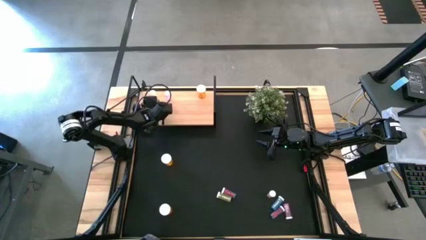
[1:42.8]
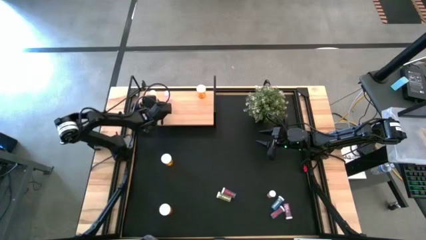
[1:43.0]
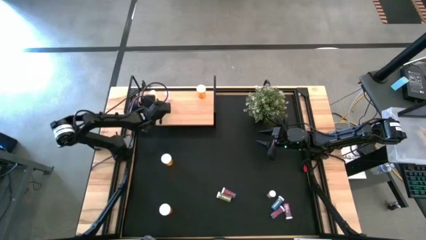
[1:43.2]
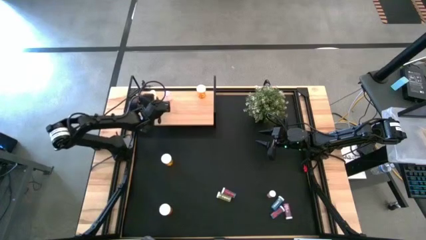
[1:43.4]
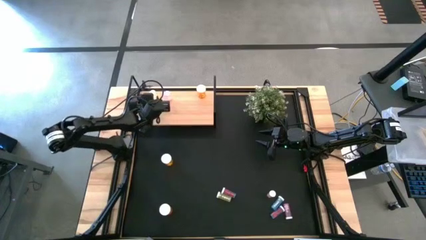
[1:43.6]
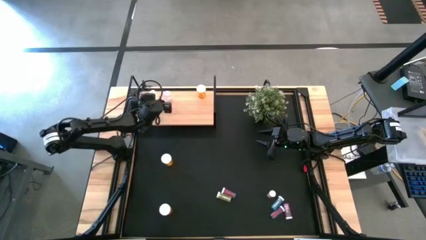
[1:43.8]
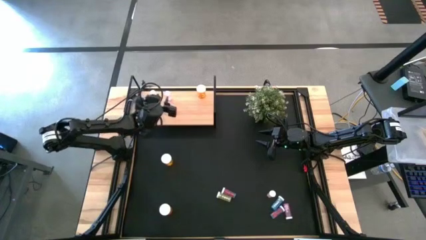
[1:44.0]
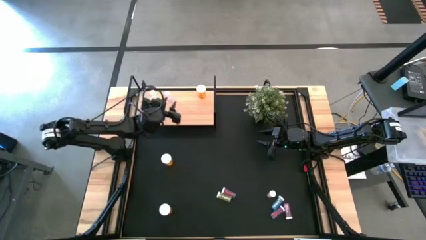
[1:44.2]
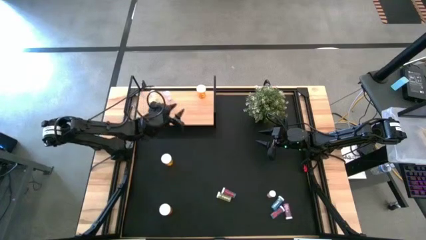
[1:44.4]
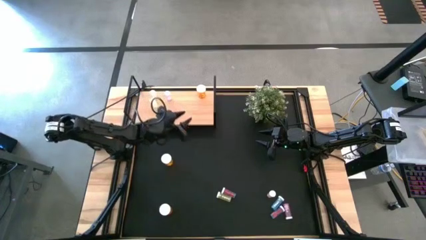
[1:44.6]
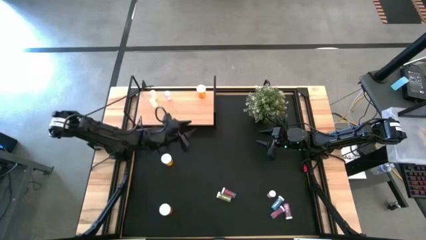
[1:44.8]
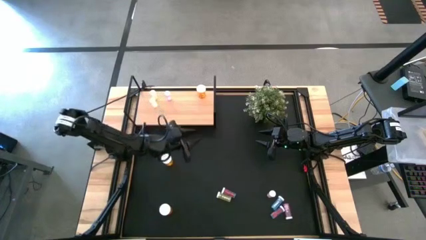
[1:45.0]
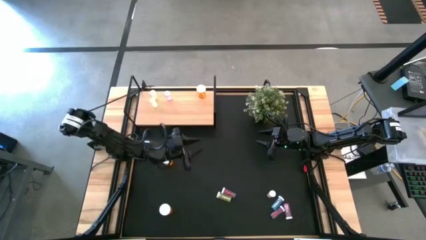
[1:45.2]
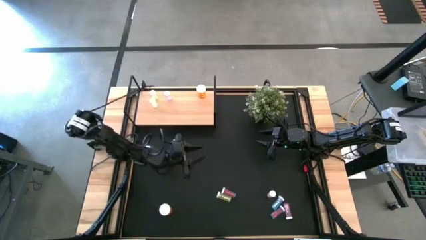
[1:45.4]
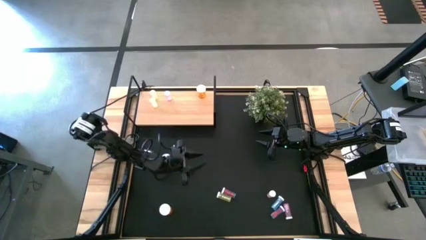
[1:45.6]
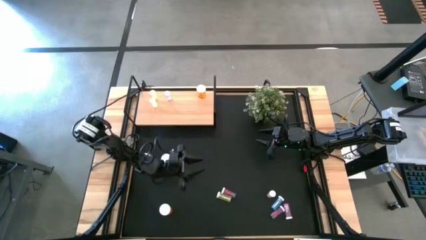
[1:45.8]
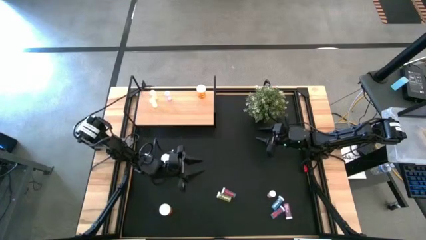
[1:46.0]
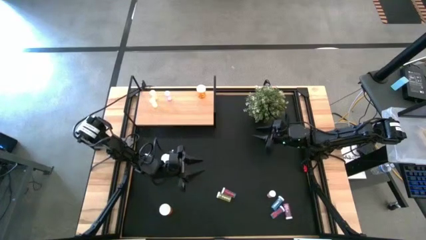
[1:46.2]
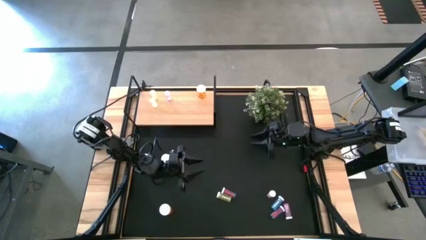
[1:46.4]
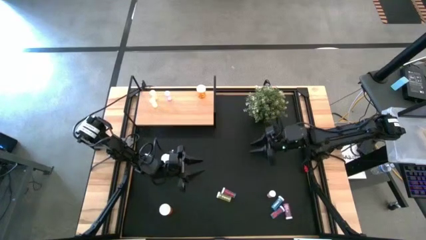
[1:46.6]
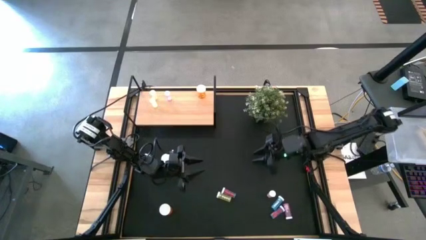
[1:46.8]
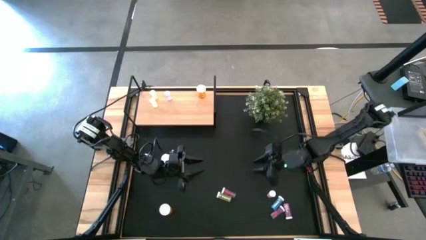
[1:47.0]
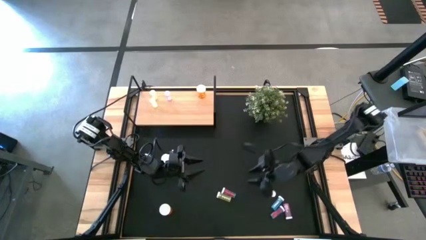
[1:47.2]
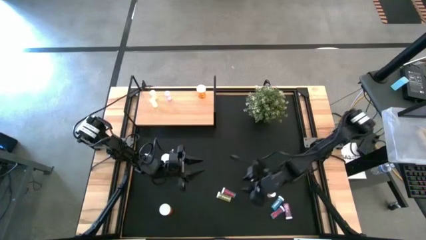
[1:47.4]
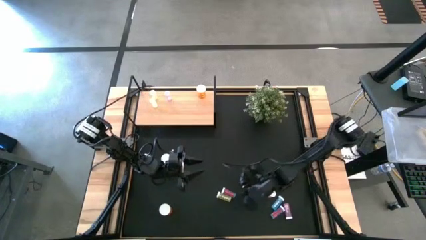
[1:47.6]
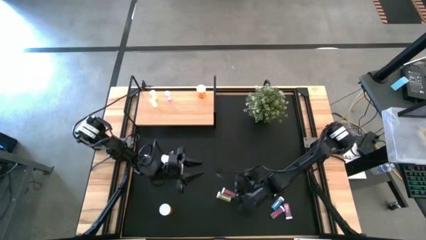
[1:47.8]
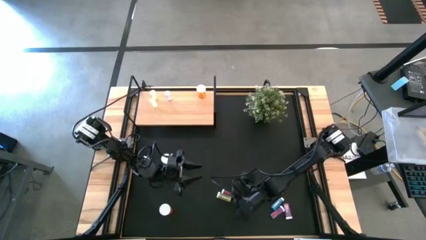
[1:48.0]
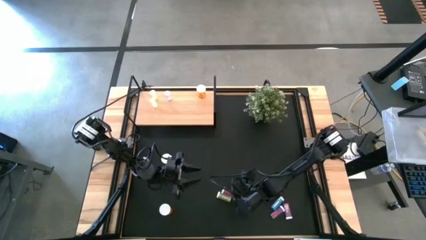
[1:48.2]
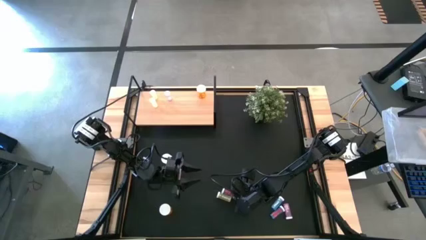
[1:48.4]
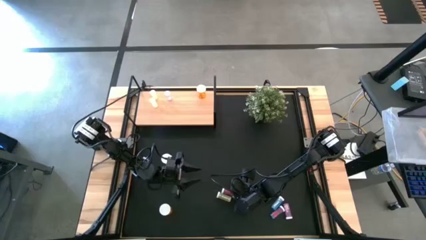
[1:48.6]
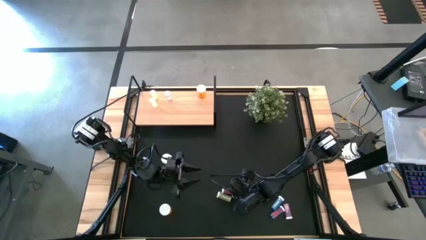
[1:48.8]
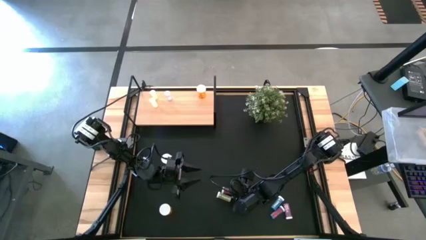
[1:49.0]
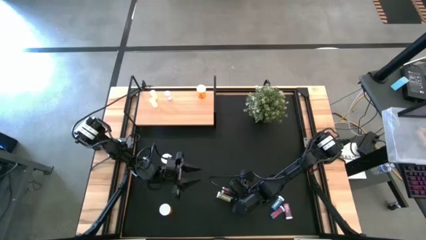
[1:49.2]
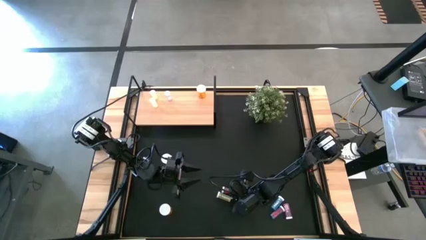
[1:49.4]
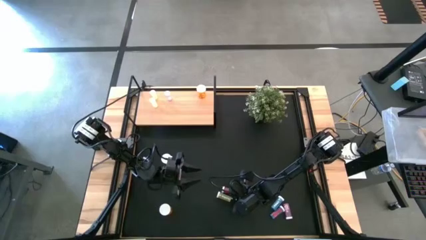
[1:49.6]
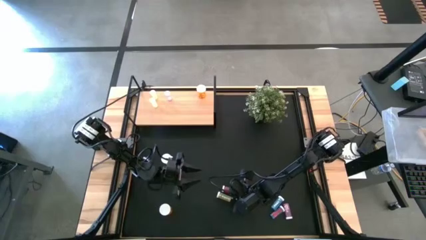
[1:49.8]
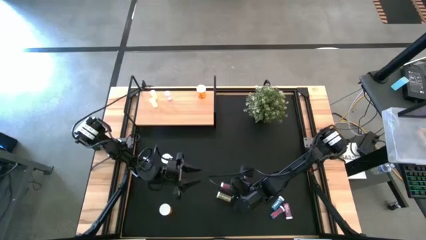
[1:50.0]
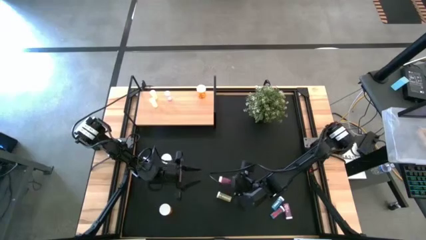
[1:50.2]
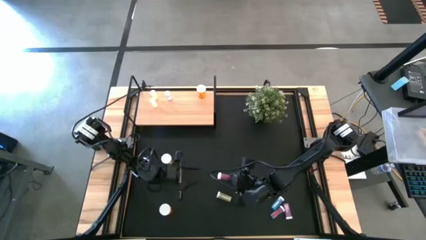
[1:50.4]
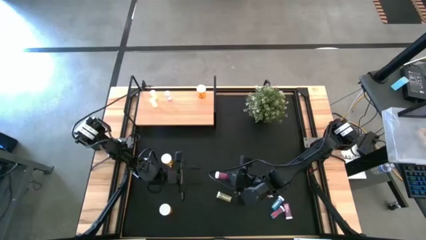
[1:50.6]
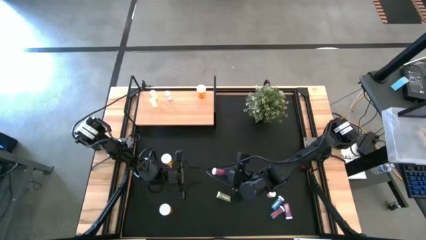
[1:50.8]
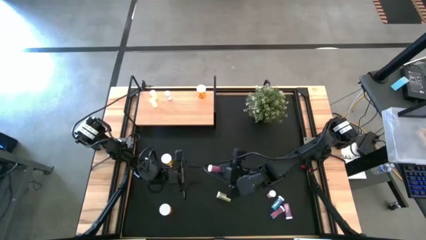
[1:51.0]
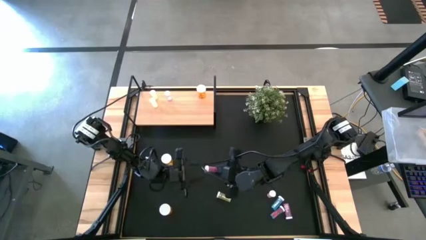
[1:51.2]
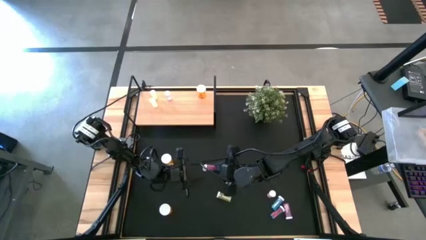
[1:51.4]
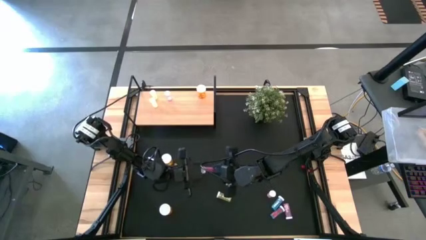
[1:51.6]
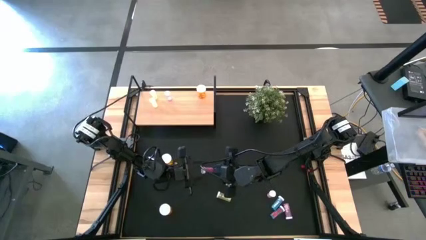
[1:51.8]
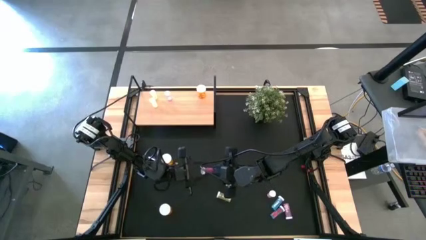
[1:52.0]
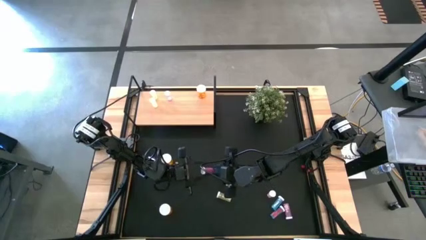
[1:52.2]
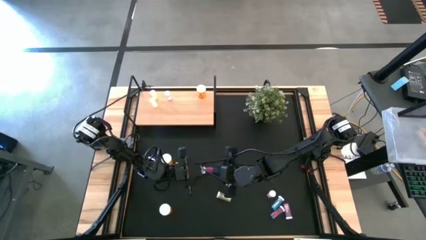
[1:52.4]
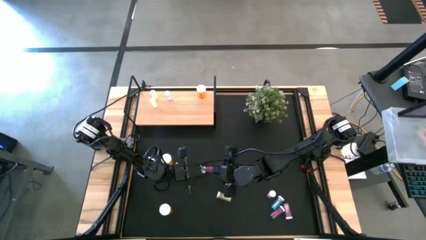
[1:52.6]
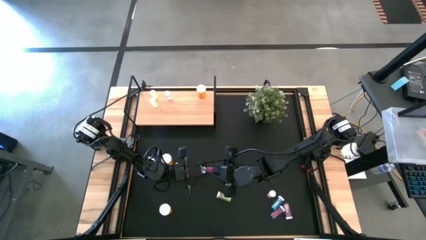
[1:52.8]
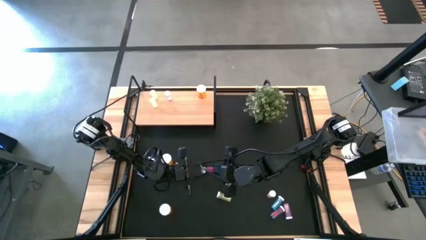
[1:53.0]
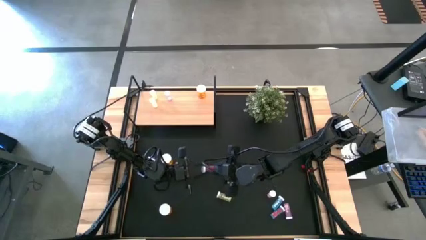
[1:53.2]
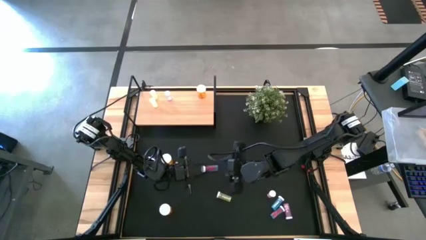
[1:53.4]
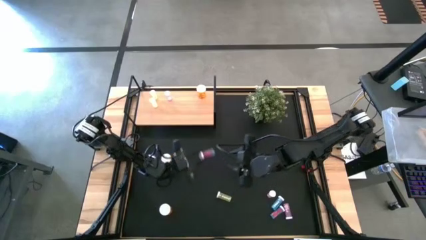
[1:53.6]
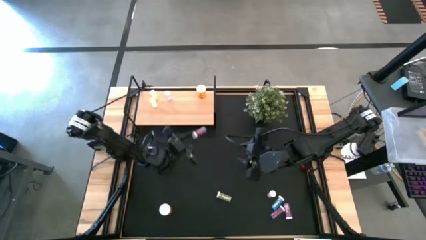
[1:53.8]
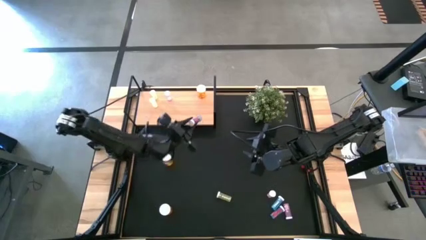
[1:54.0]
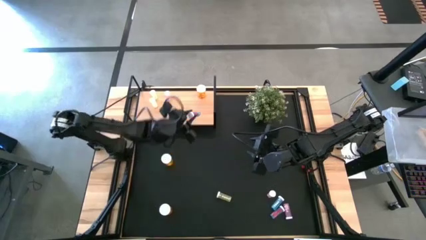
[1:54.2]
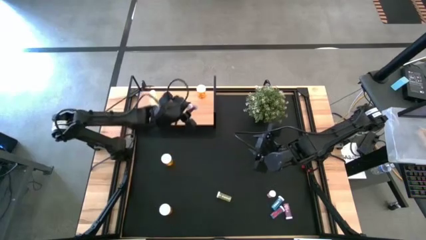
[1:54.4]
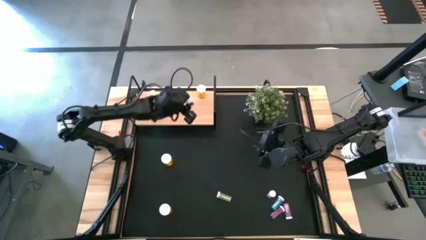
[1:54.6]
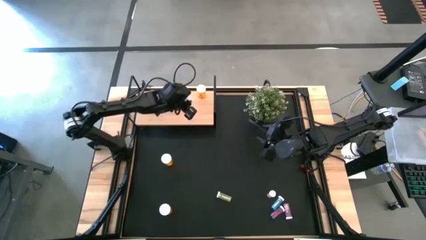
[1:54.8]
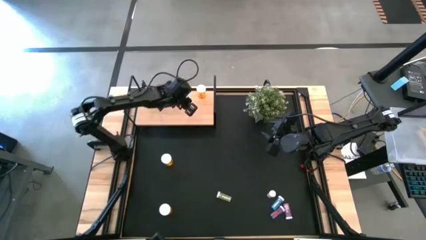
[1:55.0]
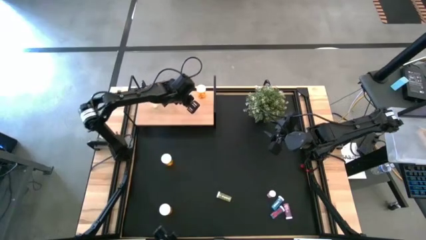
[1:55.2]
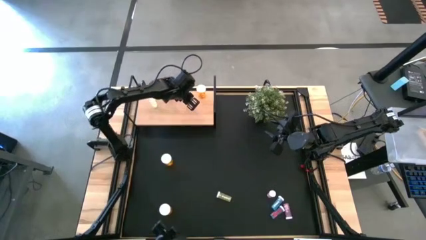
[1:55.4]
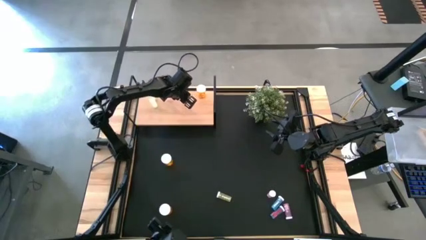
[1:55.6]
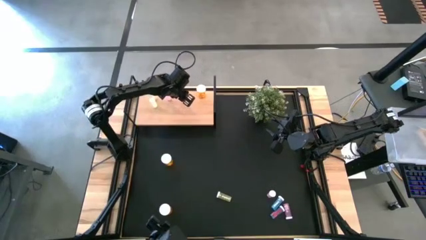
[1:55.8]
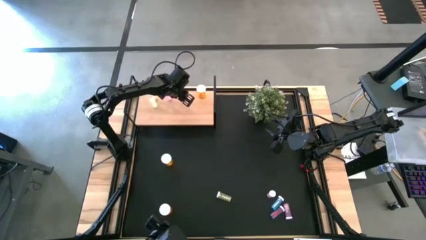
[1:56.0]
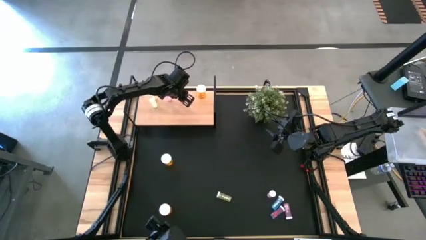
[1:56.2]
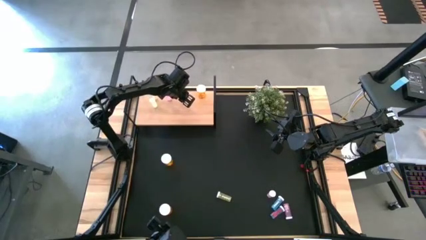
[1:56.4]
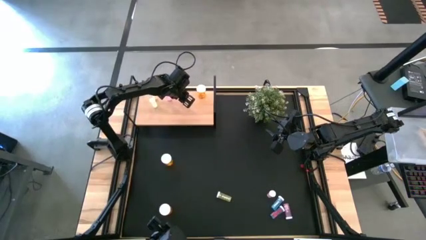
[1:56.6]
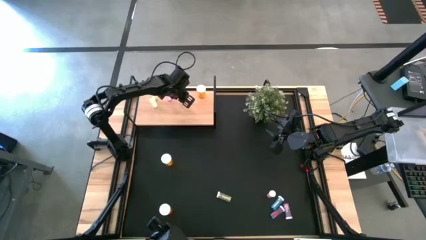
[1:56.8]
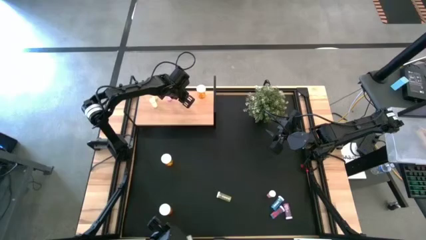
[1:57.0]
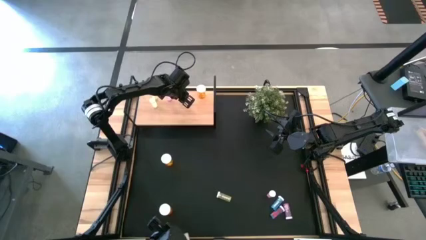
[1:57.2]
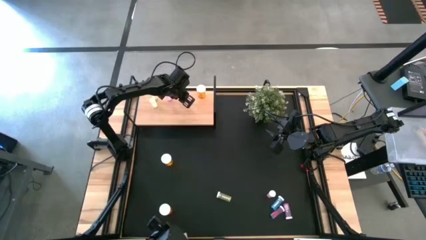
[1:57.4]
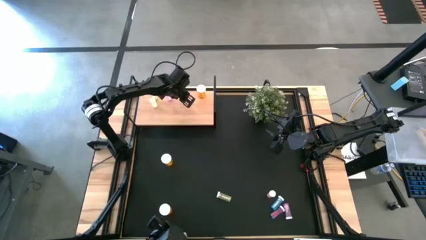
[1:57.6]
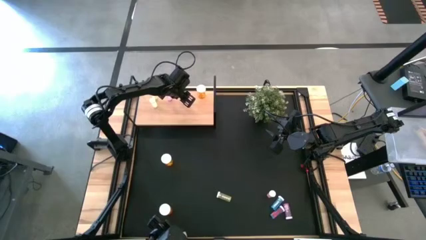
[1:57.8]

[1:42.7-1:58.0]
Task: Pick and place medicine bottles onto shelf by color
Put the top left blue medicine bottle on the shelf

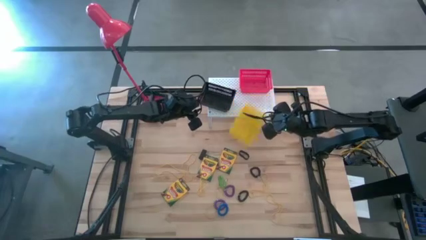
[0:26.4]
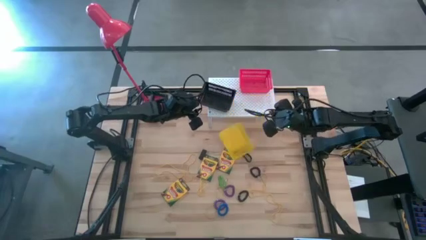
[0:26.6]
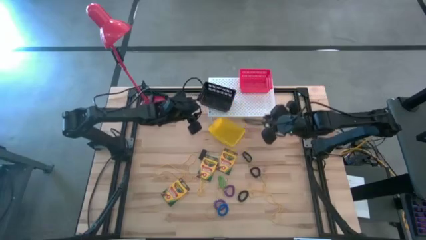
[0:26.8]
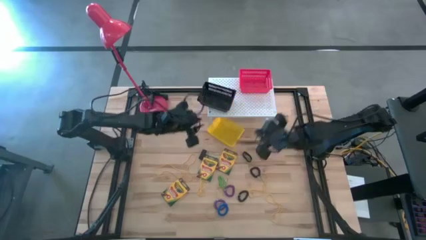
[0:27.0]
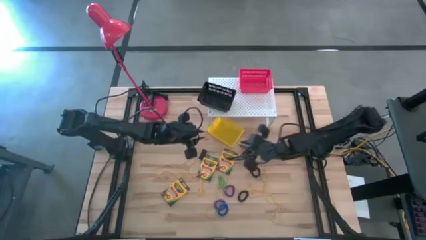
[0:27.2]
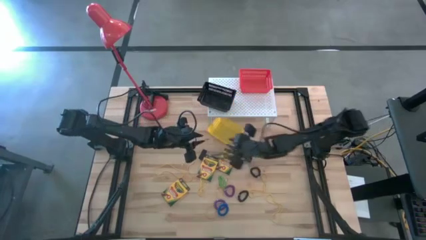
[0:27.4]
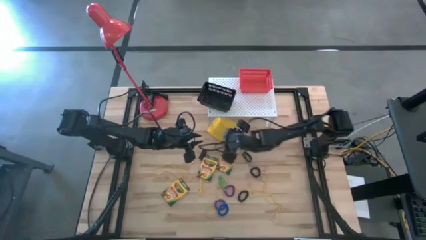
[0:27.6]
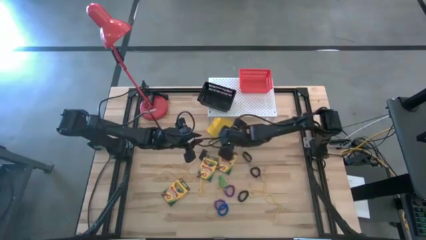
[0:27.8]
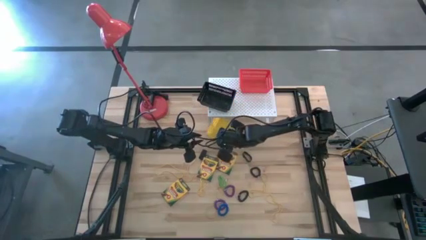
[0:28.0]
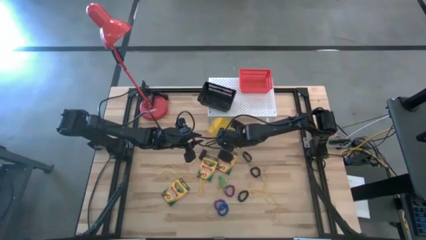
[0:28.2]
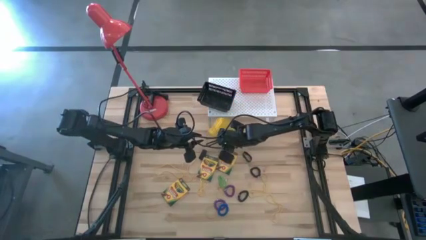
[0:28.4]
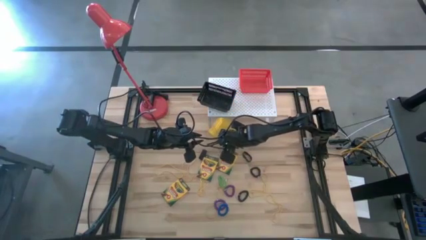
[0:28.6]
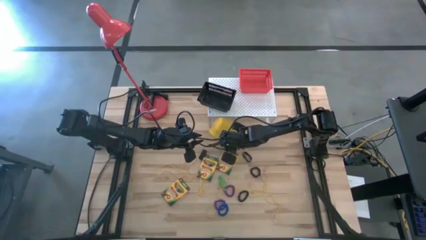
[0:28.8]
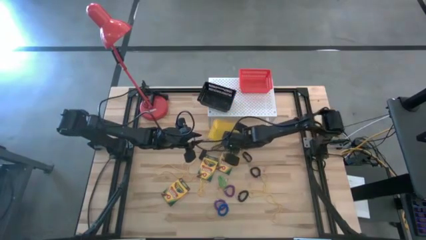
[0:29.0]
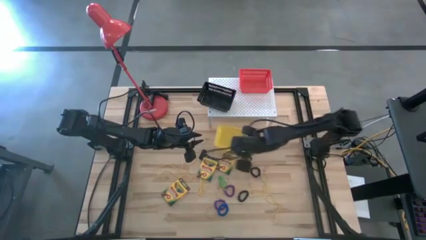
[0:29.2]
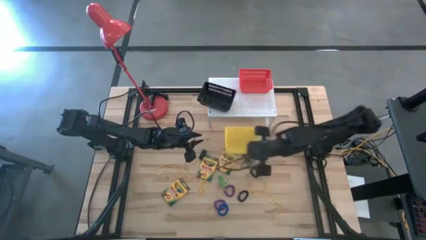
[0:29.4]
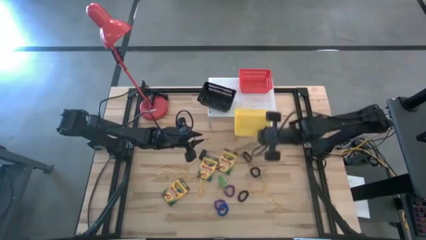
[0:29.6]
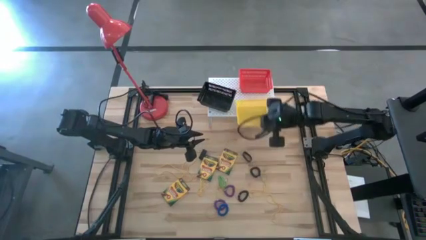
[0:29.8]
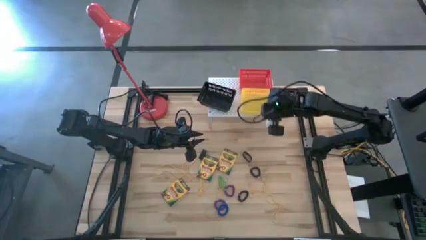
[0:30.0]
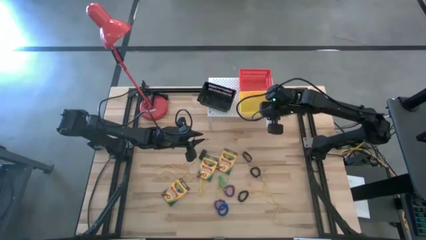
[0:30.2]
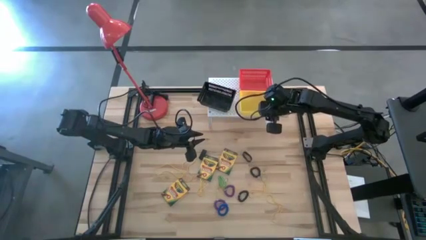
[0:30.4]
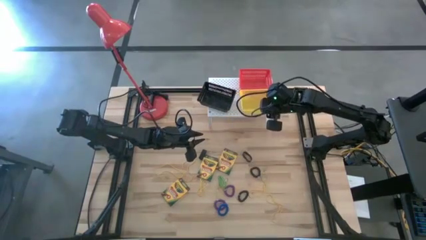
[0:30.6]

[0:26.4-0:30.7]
Task: Pick & Place Office Desk Supplies
Put the yellow bin on the shelf
